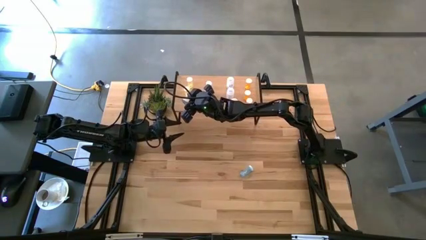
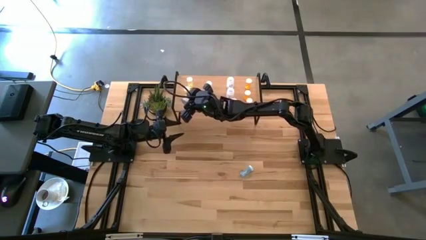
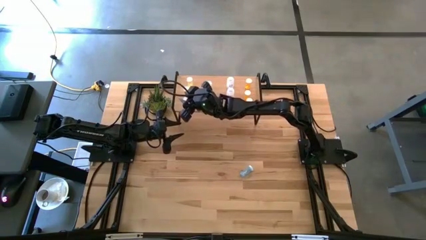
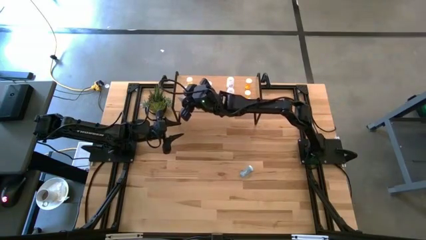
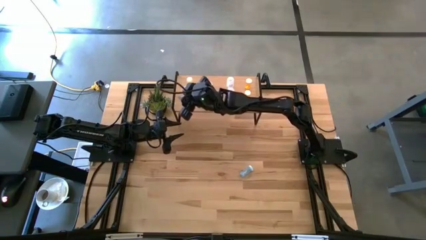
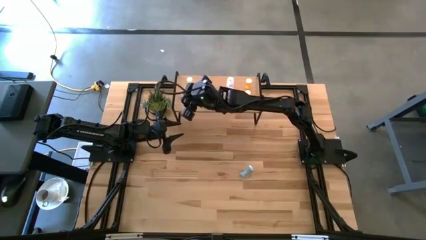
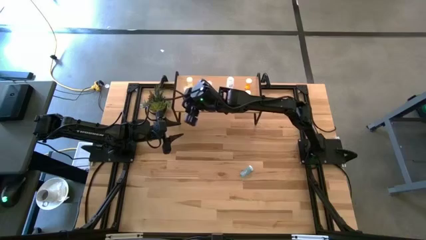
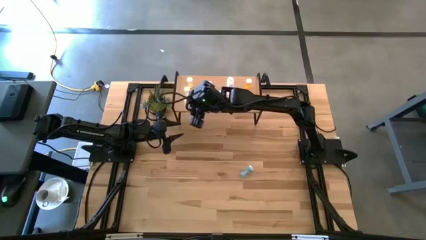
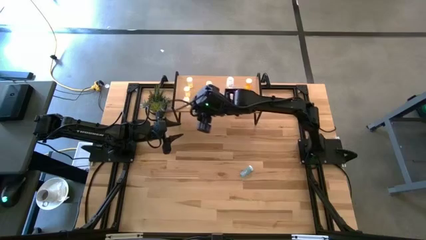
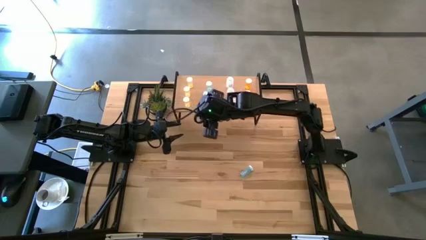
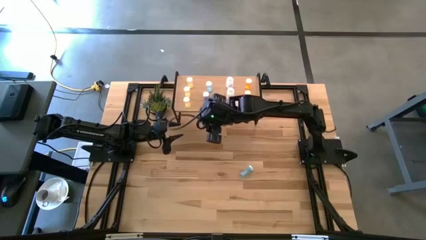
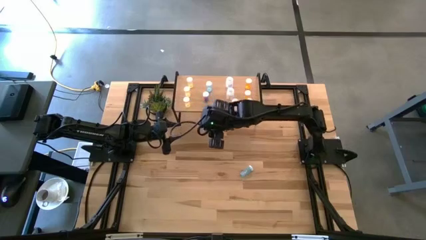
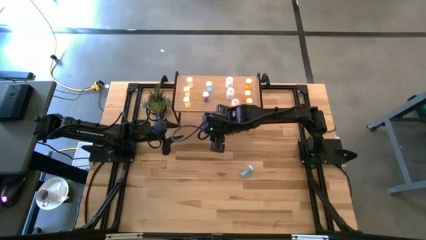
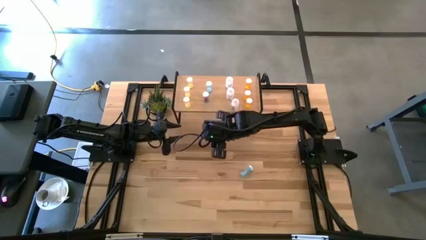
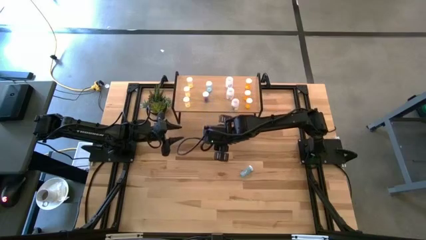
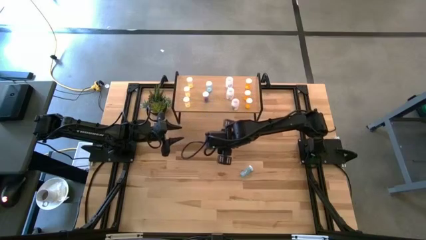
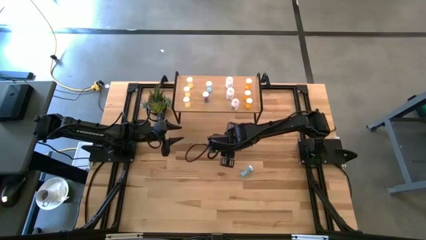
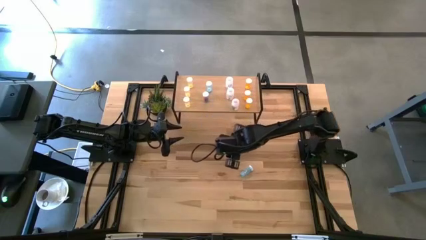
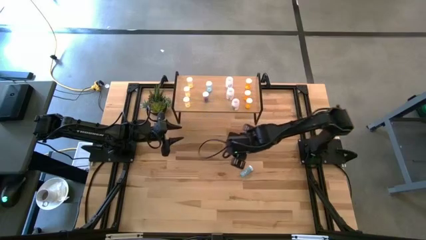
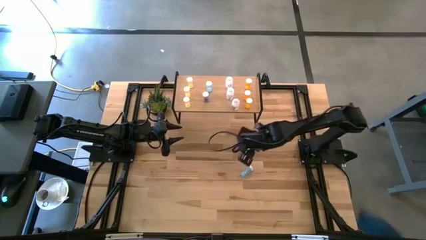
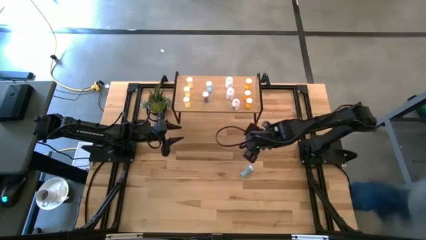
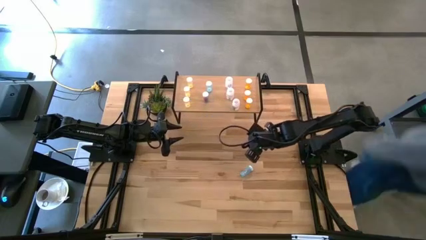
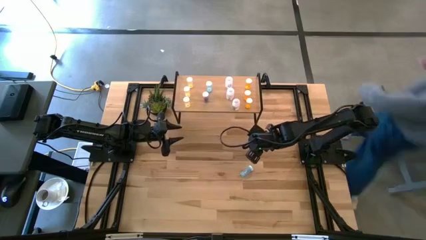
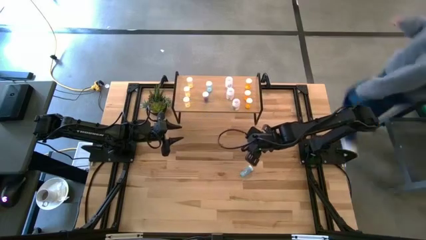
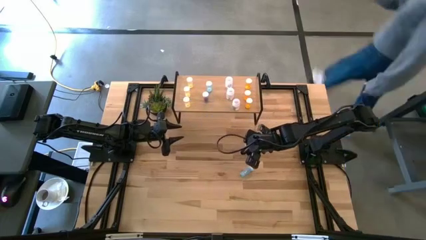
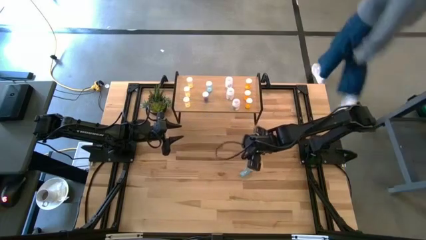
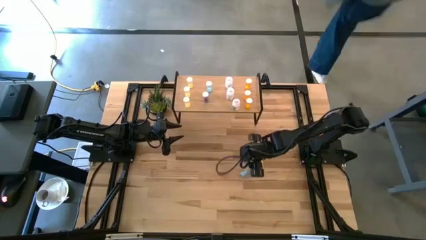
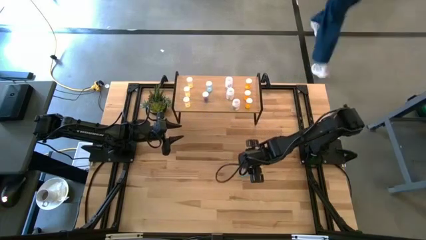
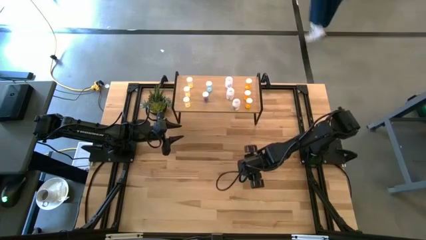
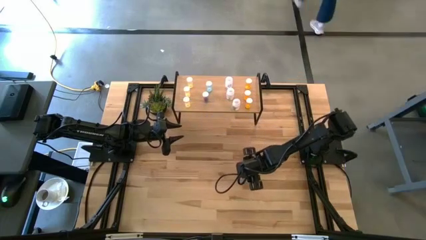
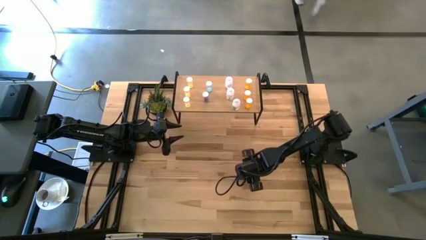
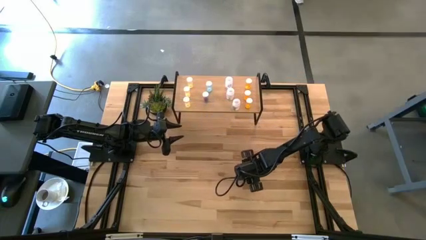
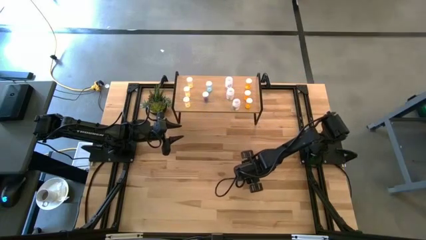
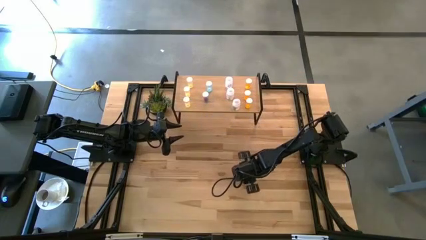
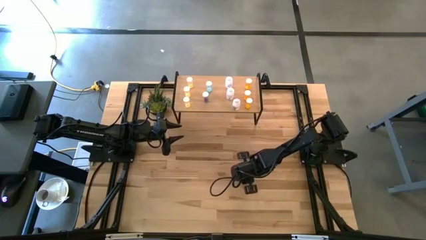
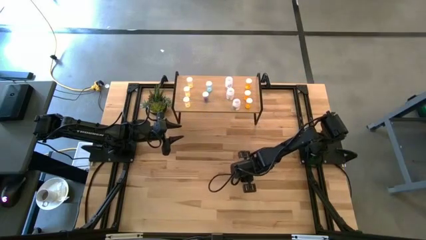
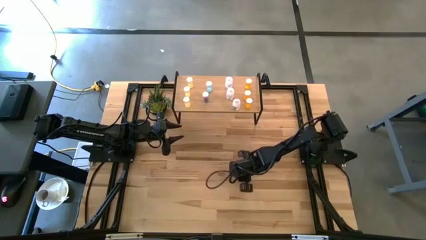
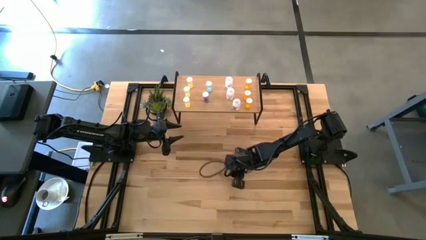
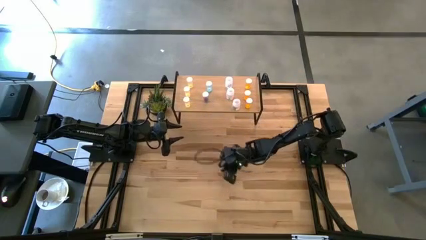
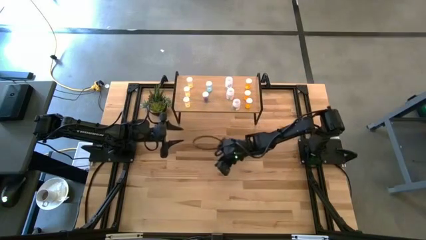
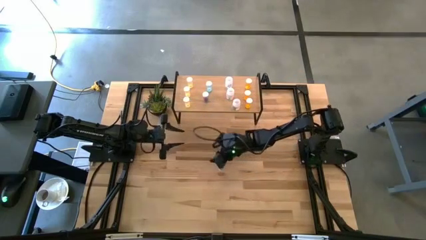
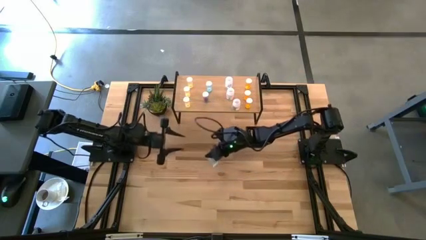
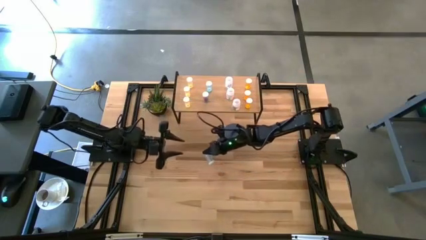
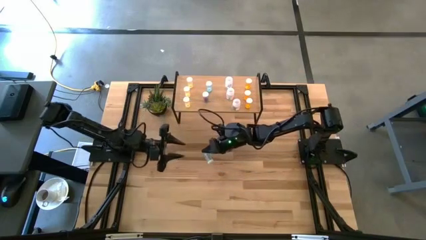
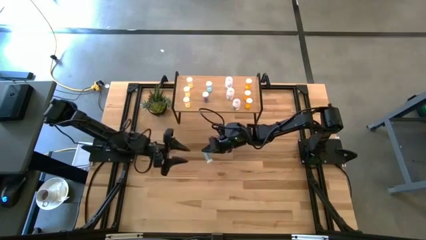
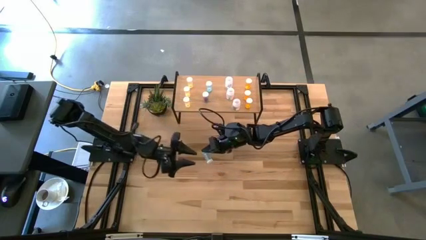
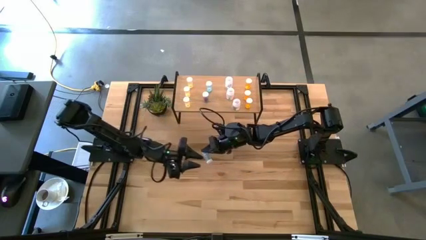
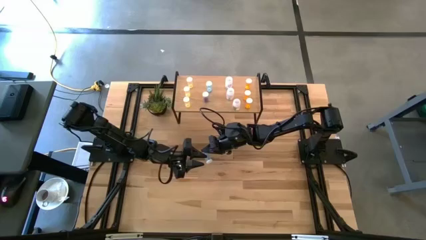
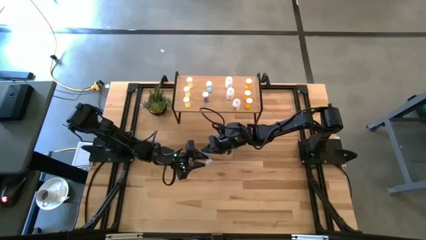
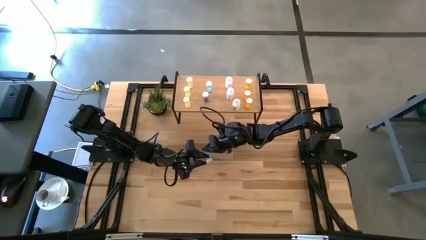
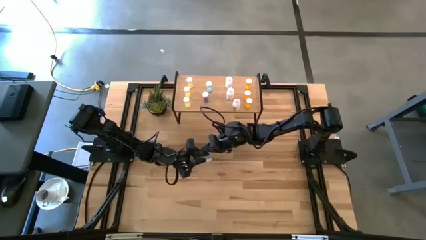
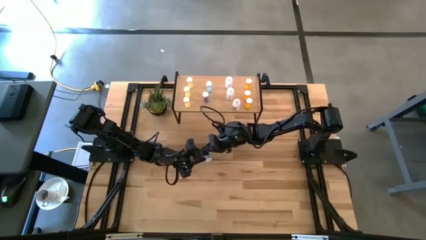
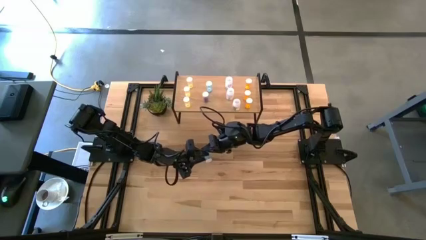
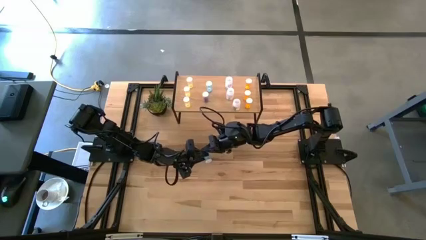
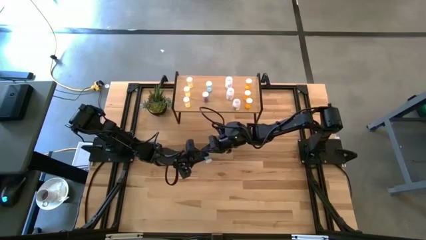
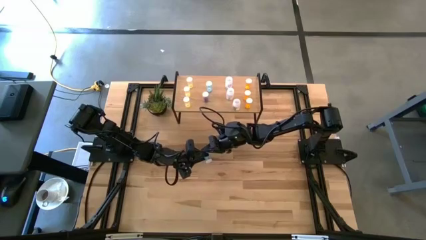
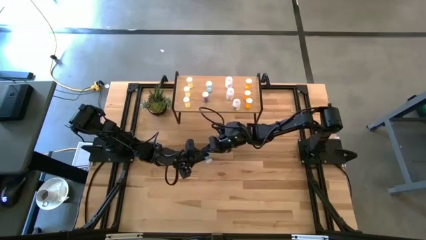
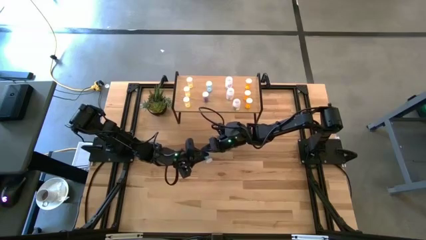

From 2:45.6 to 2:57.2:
Task: Pick and place medicine bottles onto shelf by color
Put the blue pill bottle on the shelf

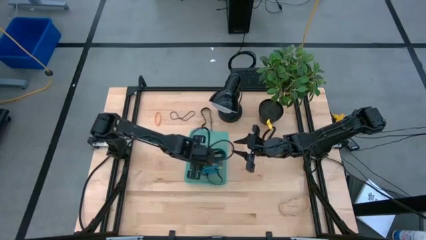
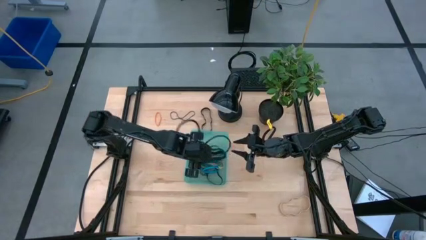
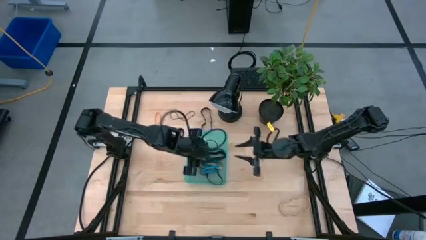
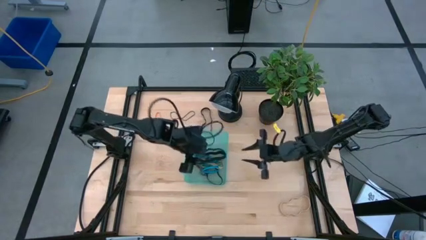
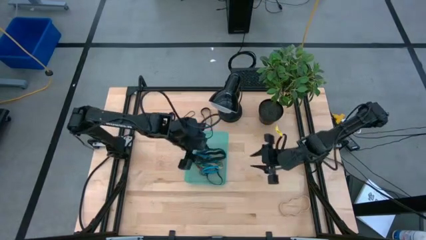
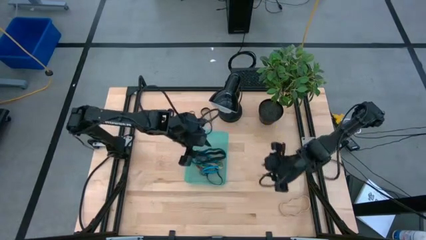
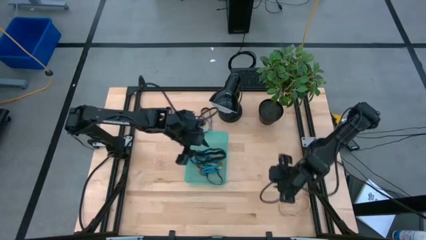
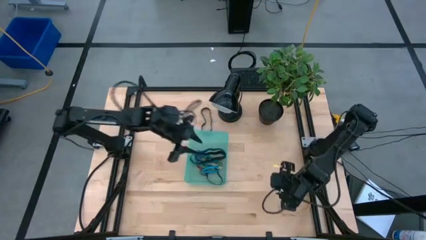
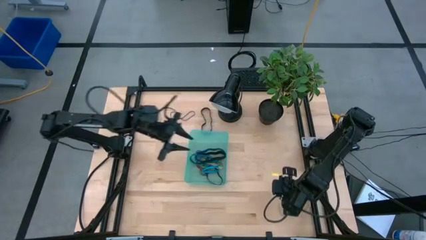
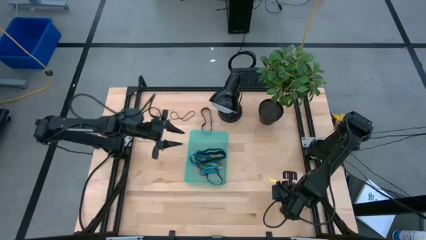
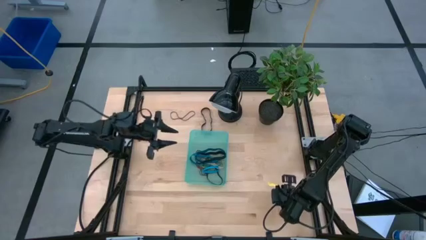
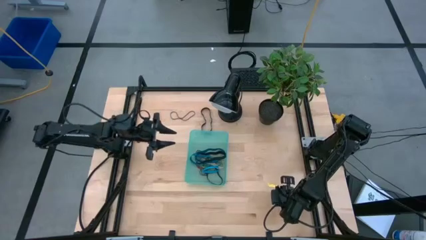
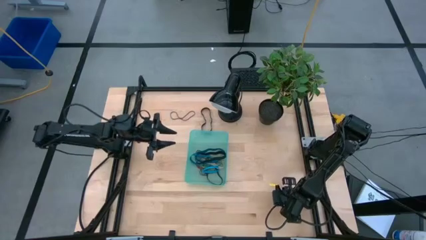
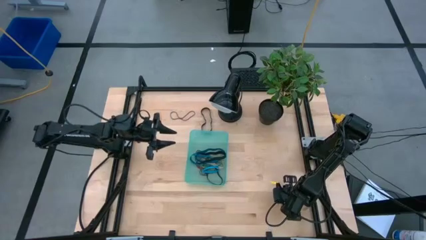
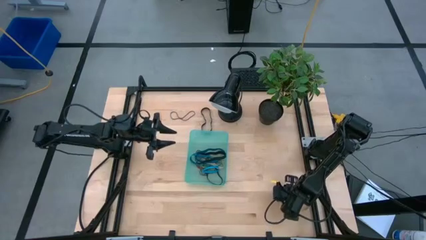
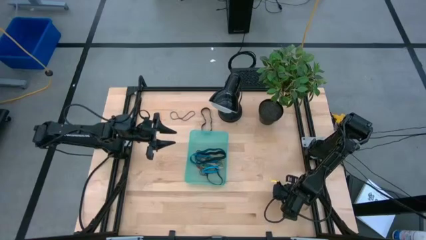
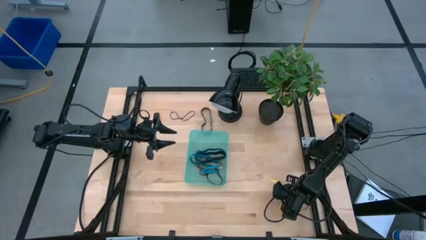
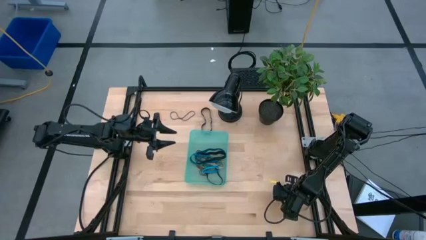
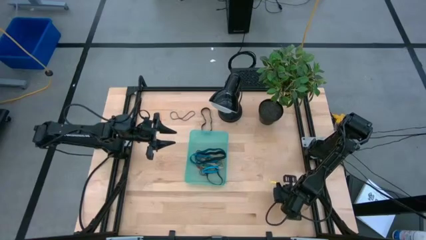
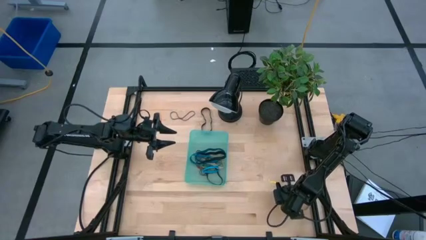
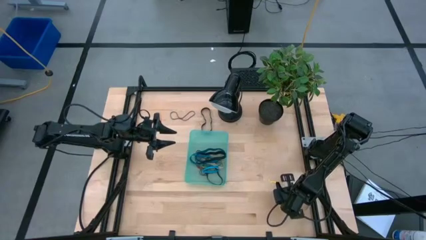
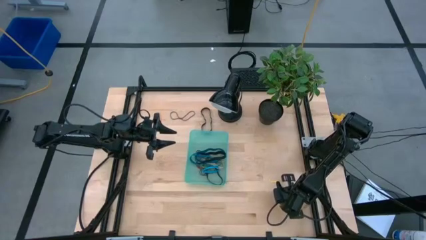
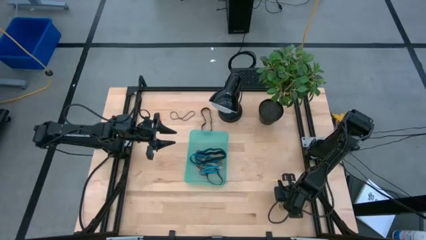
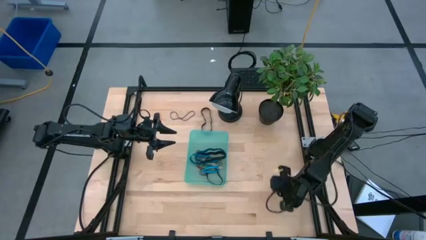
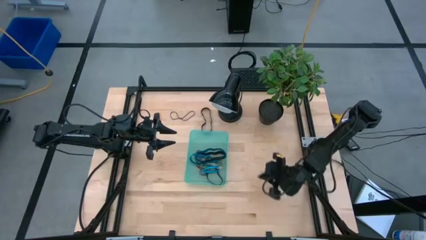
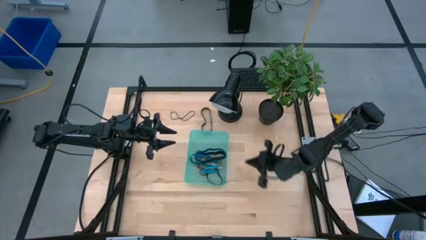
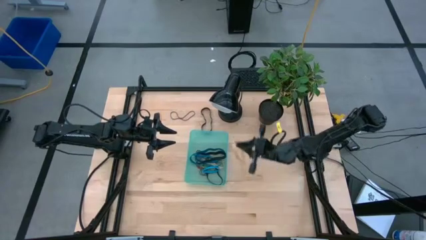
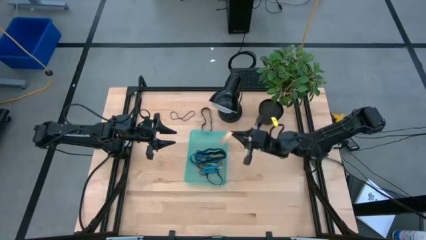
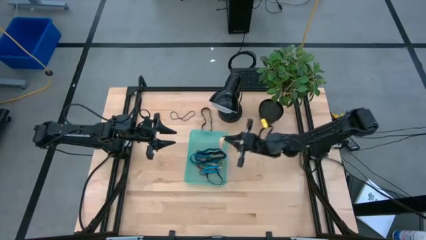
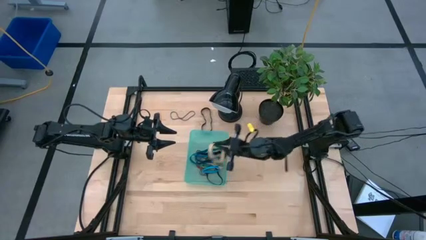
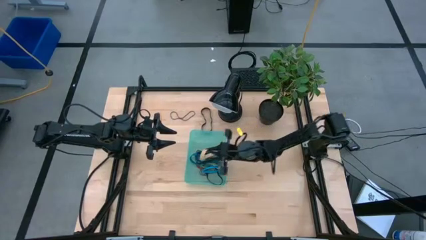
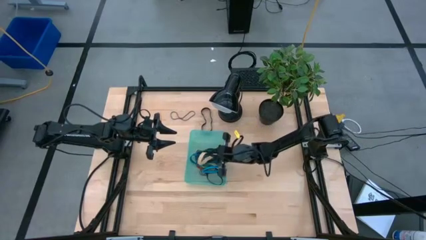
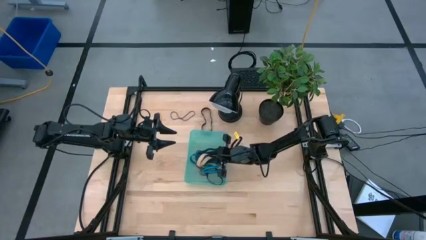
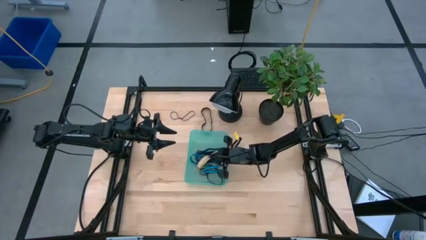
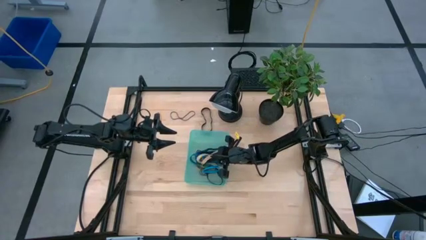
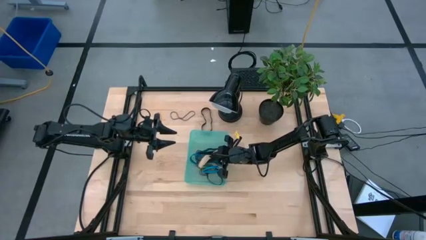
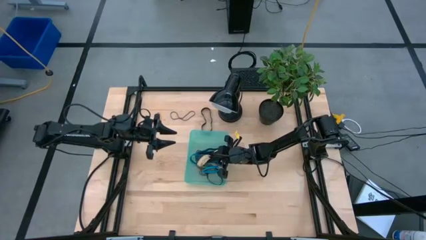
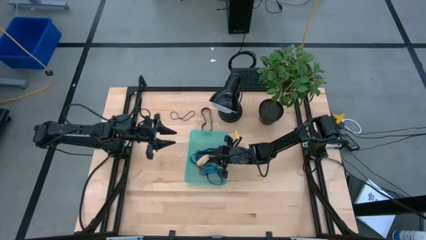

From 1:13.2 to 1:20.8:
Task: Pick and place rubber bands into bin
Put the white rubber band into the basket
